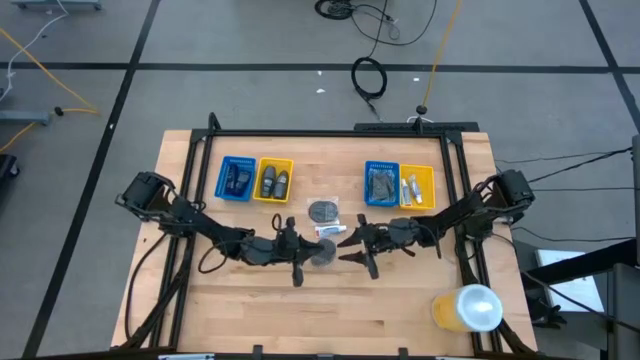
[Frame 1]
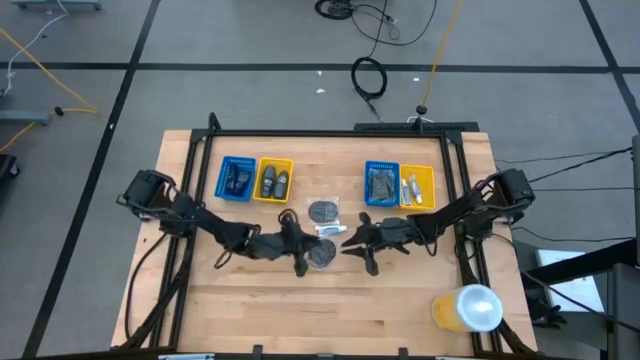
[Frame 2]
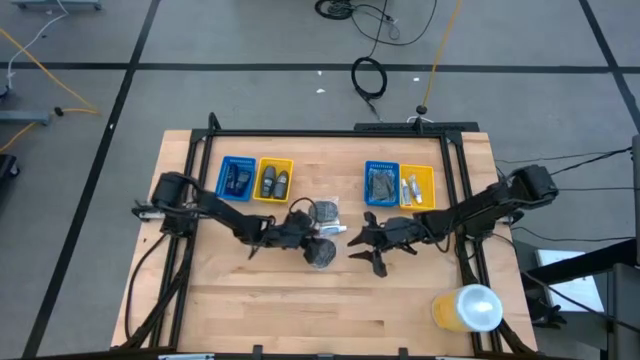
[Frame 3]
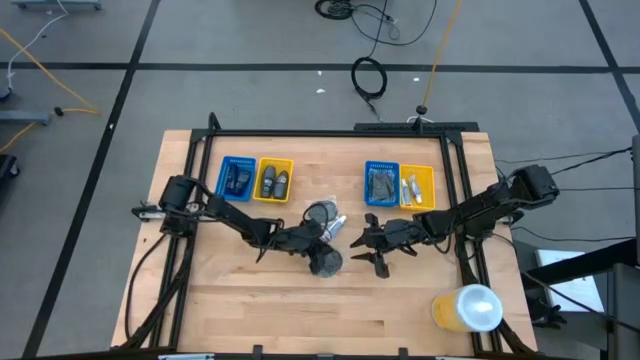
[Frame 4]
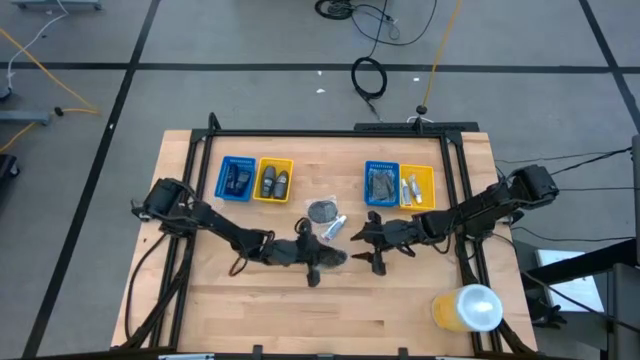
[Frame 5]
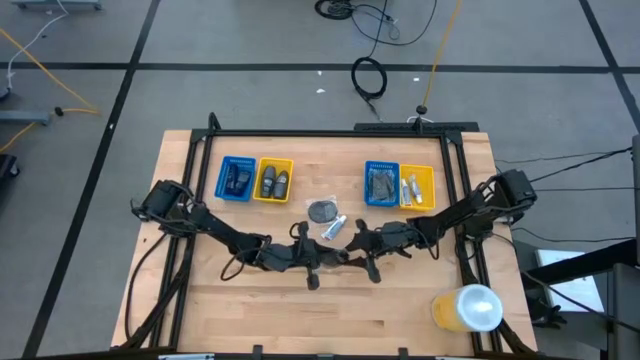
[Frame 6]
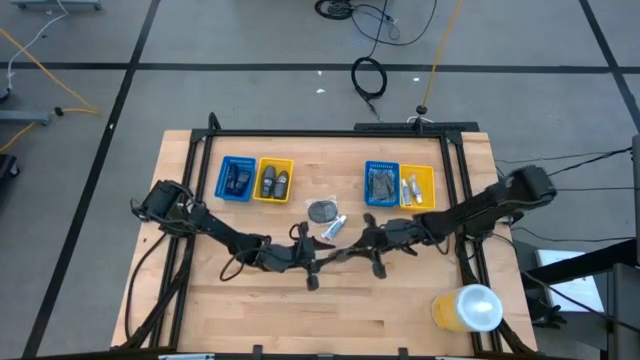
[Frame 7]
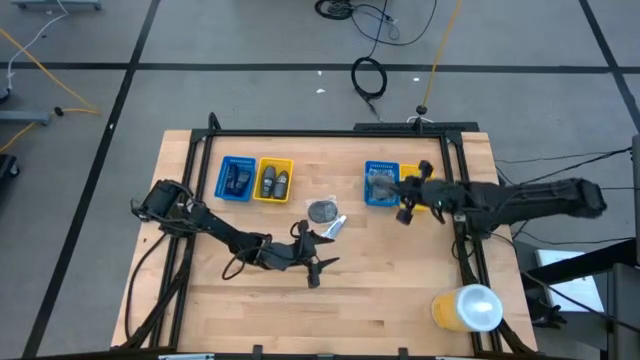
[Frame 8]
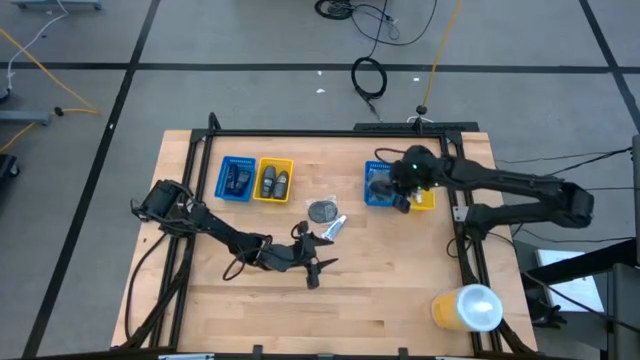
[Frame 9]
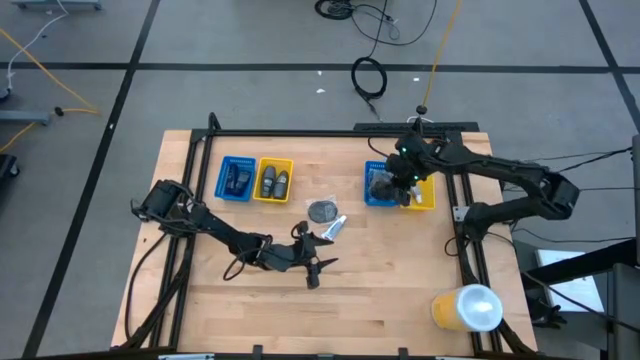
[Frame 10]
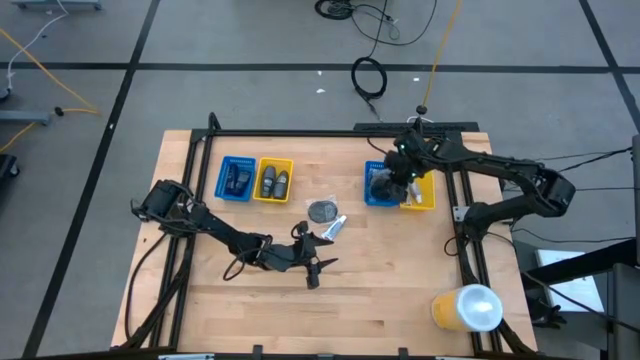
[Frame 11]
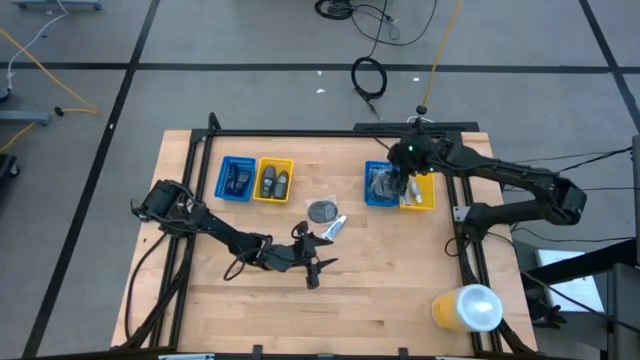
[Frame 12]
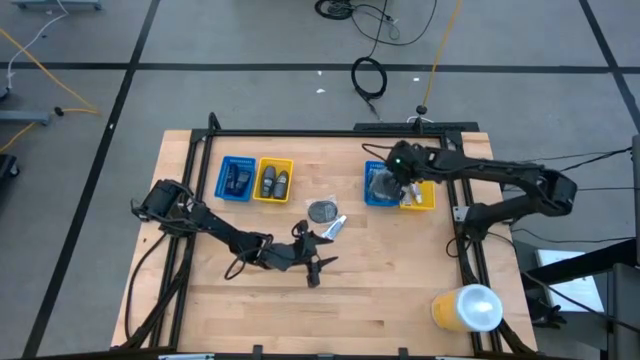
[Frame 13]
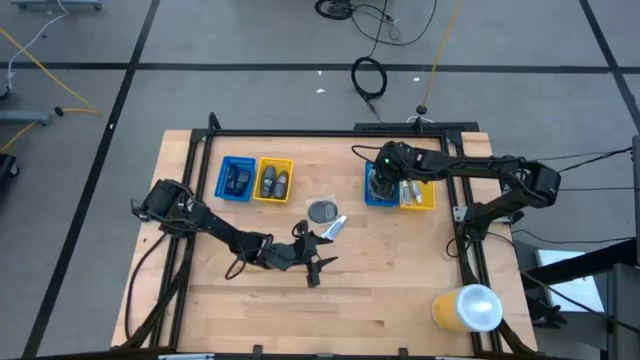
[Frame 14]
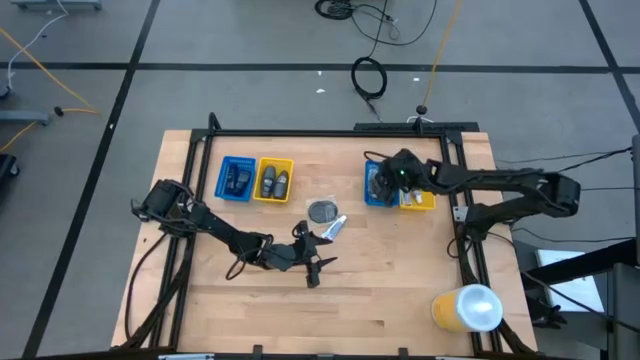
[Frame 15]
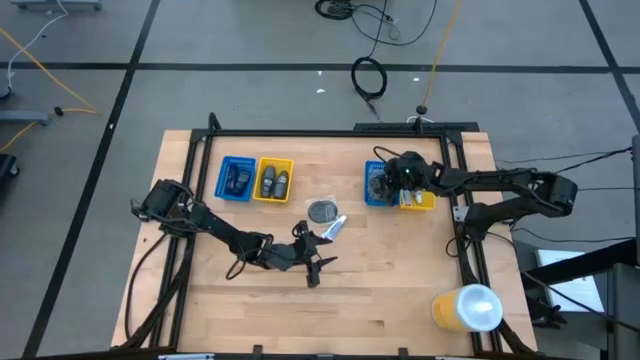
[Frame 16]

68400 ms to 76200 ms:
Task: Pick & Place Travel size toiletries
Put the black hairbrush into the right blue bin

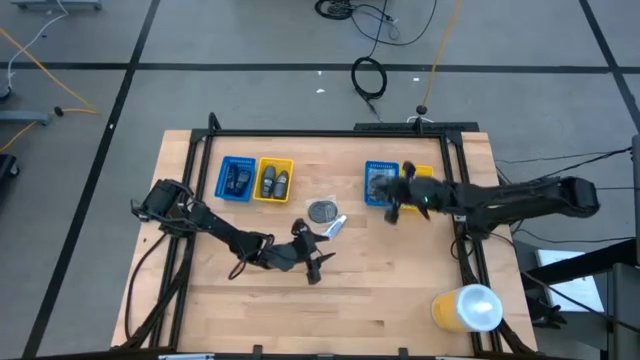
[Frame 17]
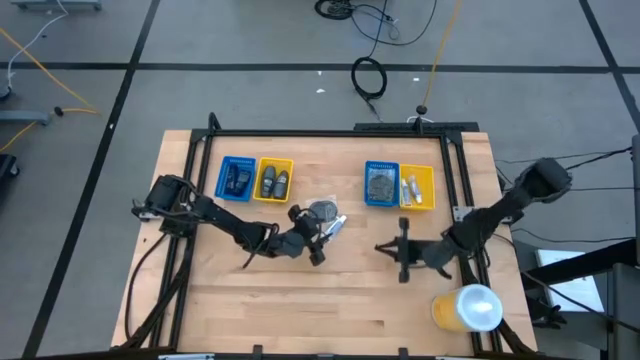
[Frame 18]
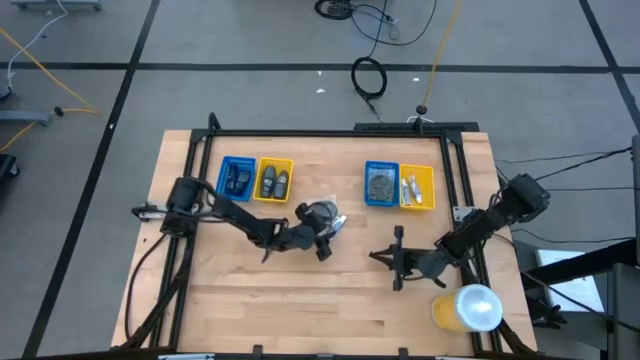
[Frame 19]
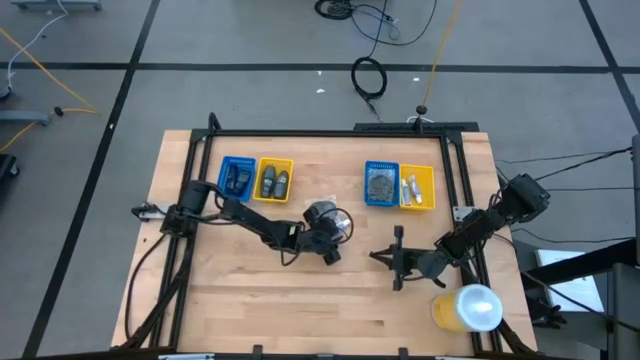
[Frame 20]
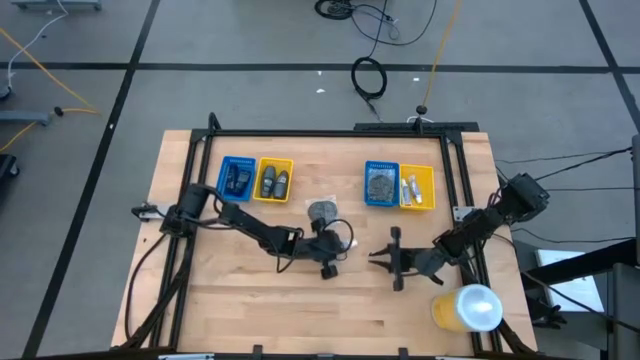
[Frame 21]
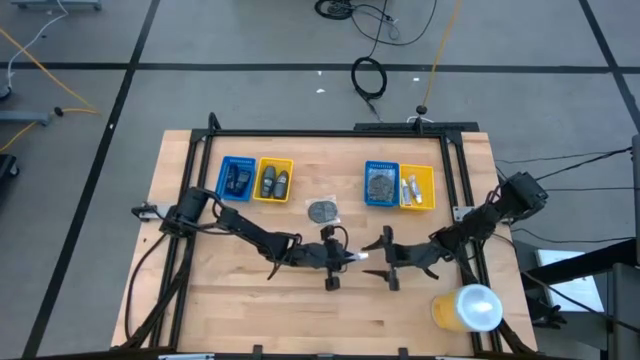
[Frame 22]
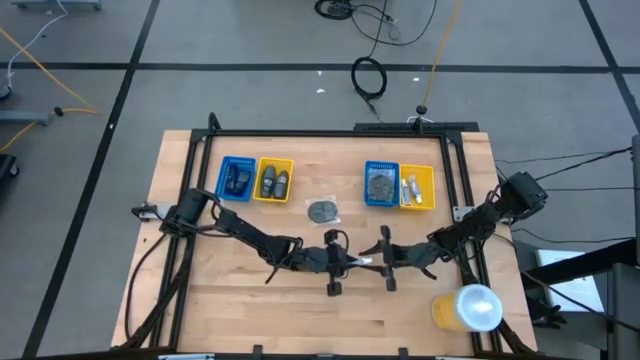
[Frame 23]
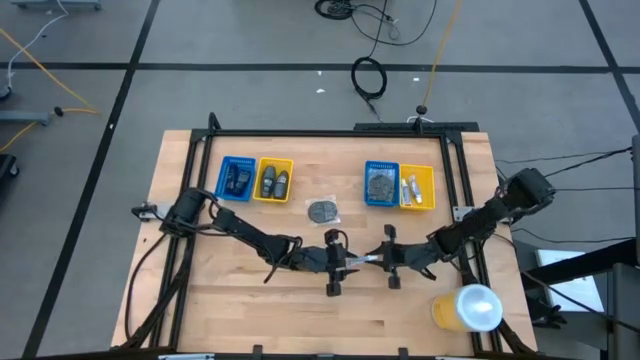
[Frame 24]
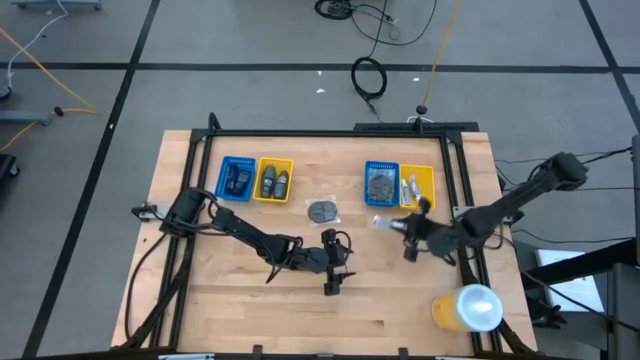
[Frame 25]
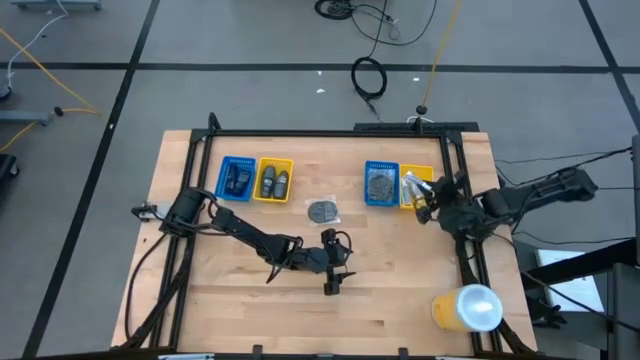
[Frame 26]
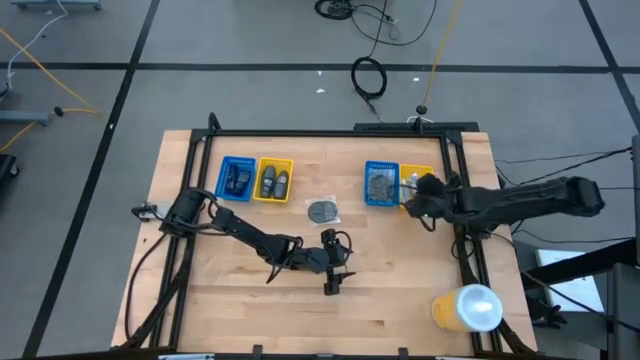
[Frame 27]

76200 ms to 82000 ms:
Put the white toothpaste into the right yellow bin

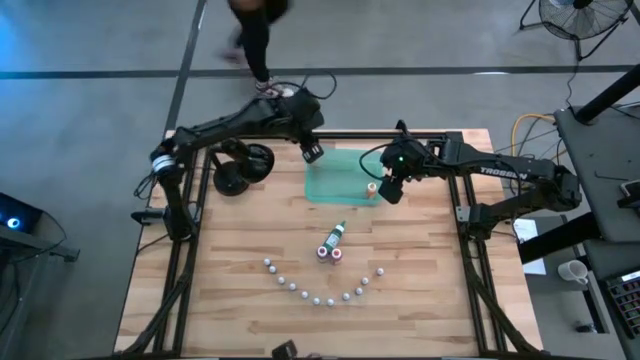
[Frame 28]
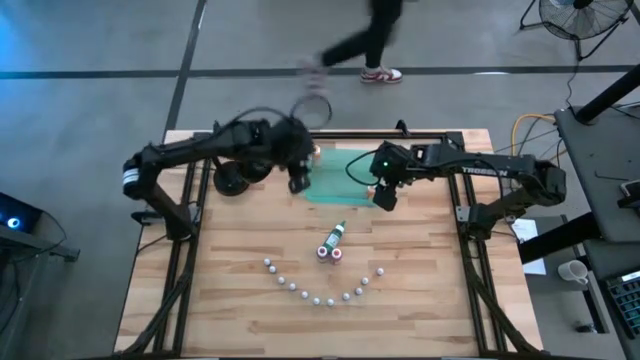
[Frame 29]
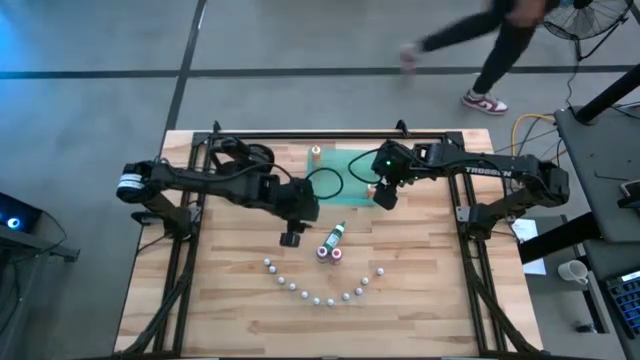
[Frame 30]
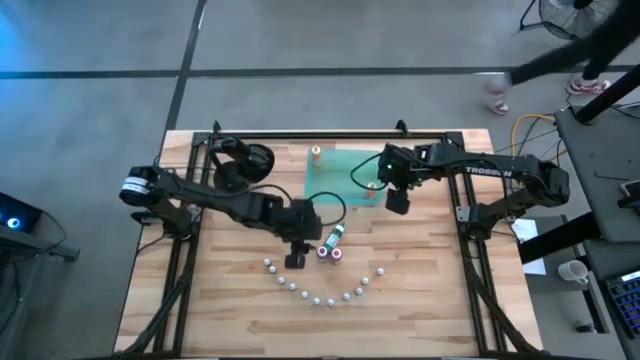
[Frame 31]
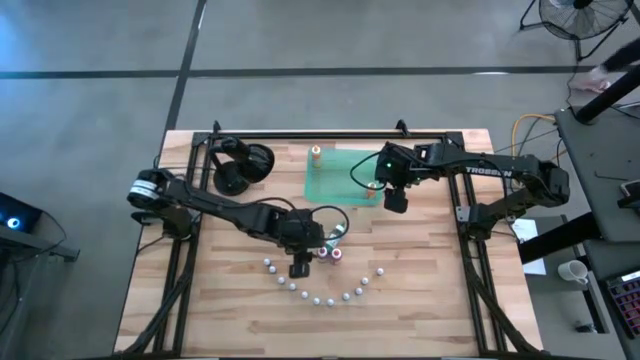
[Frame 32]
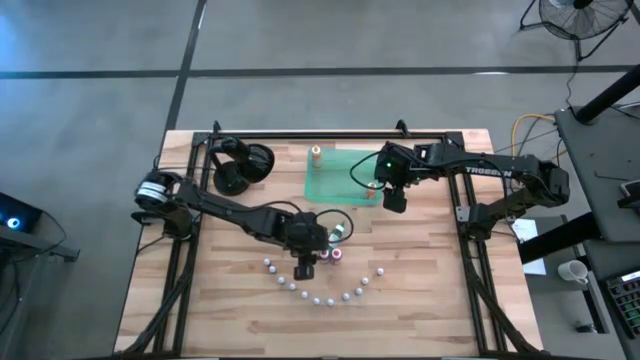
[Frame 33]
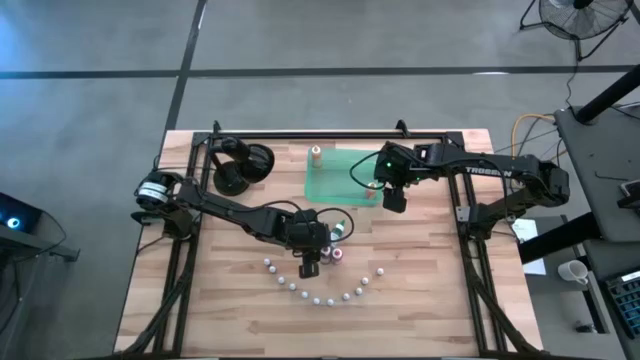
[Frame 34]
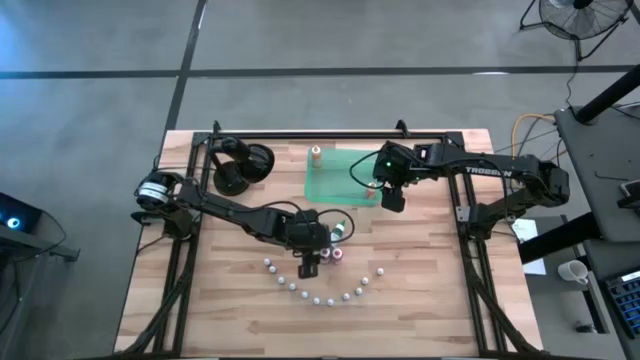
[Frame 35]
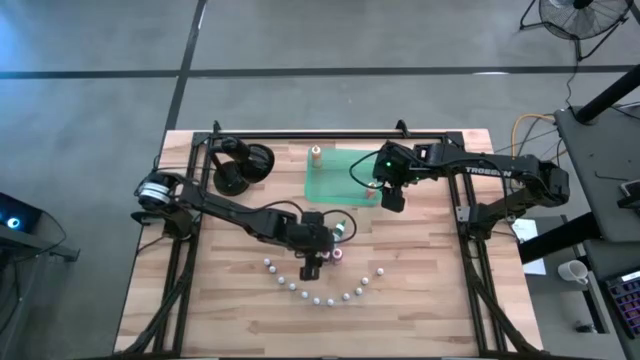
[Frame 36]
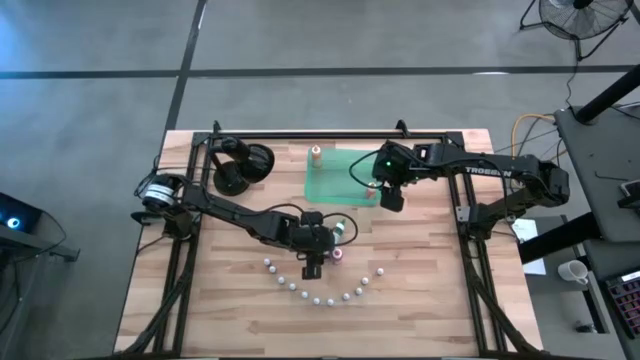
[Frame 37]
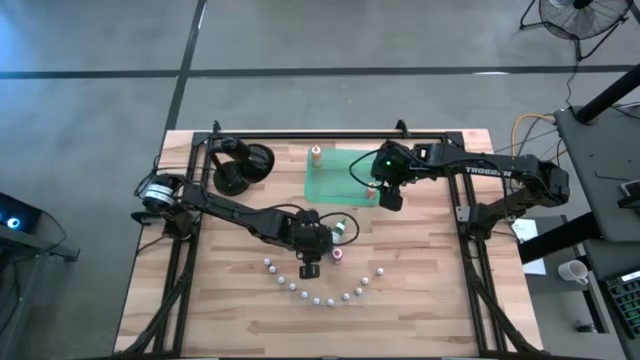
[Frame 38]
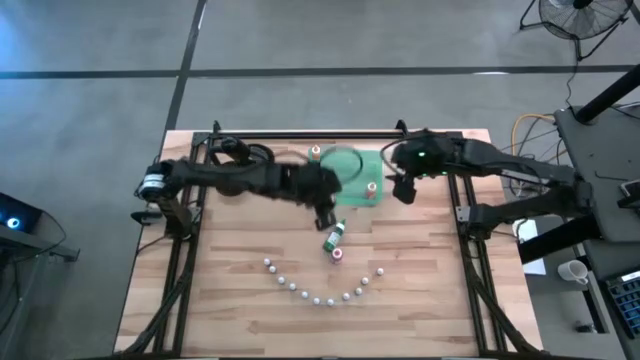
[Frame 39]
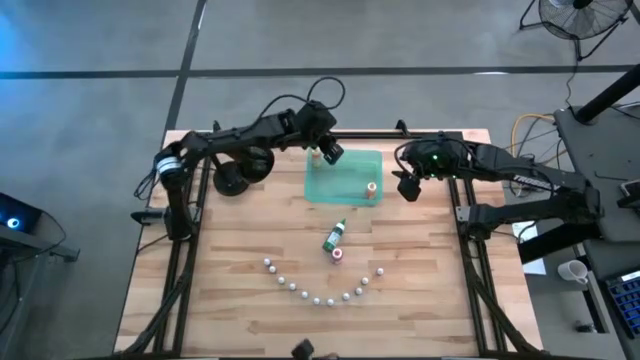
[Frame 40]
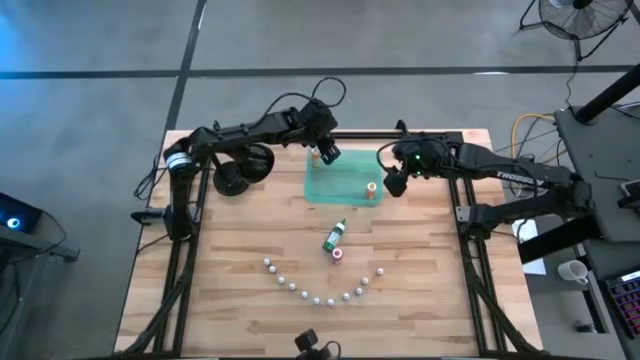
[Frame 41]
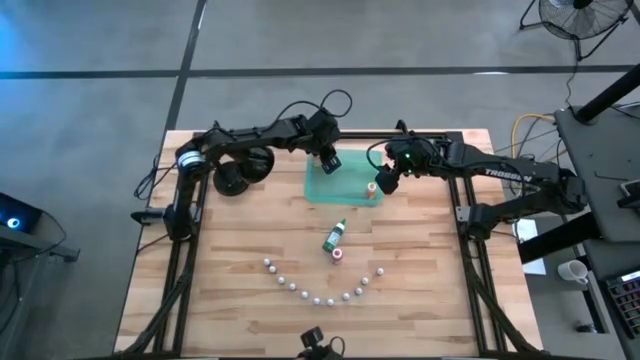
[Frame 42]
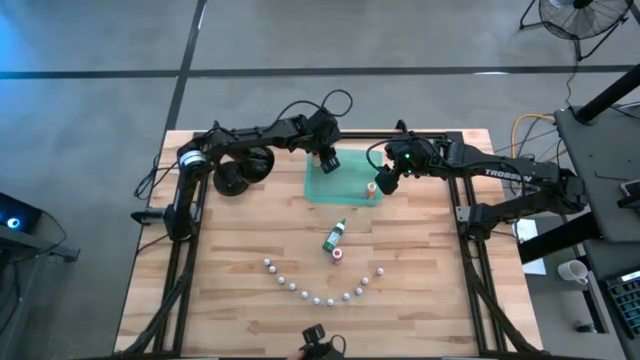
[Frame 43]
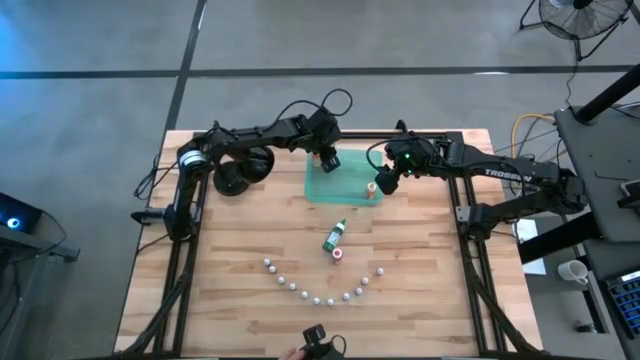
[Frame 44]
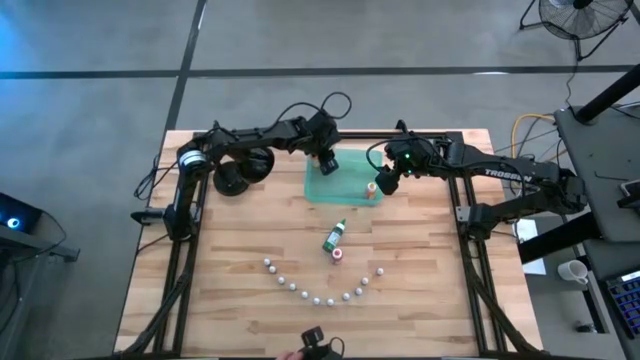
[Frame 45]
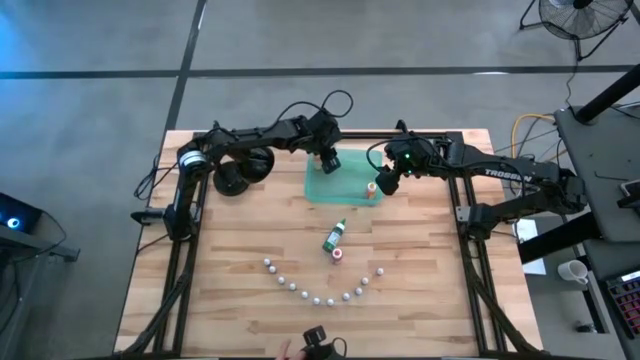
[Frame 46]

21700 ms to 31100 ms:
Task: Pick & Place food coloring
Put the large red food coloring bottle into the green bin
